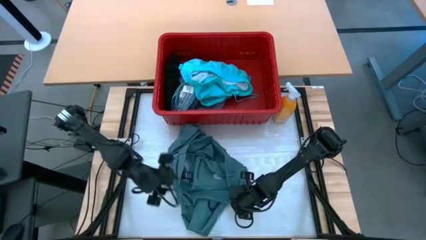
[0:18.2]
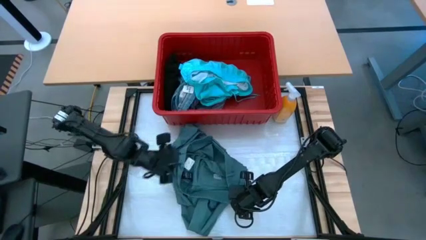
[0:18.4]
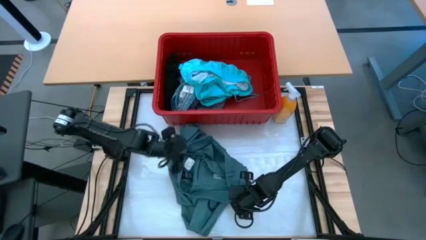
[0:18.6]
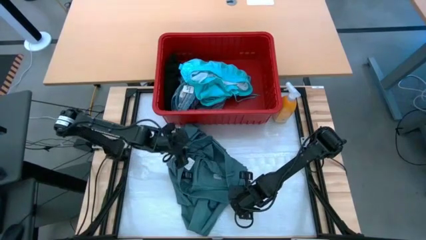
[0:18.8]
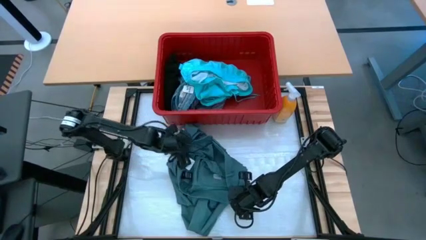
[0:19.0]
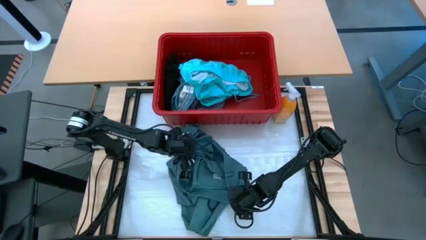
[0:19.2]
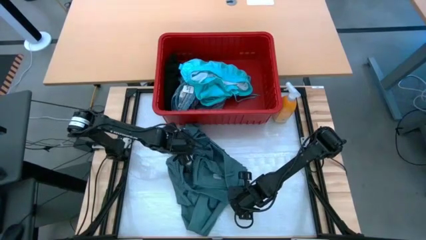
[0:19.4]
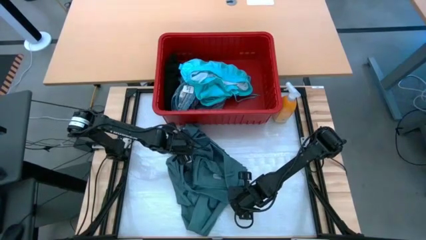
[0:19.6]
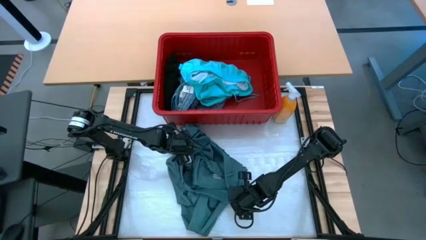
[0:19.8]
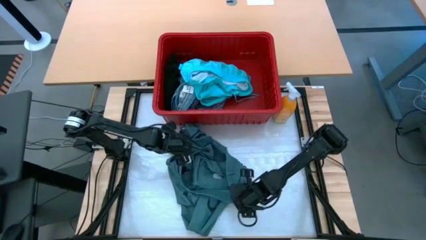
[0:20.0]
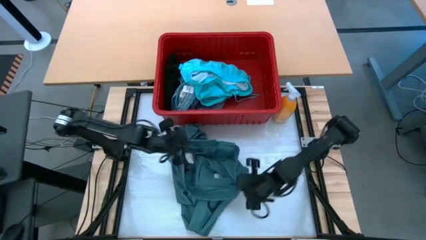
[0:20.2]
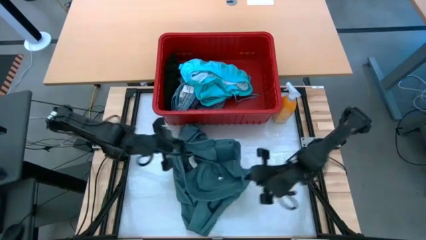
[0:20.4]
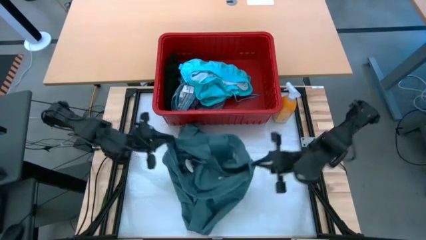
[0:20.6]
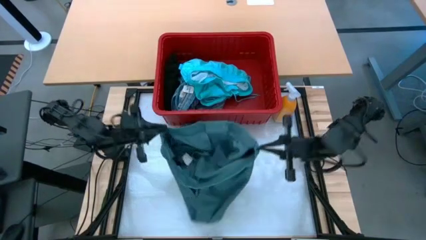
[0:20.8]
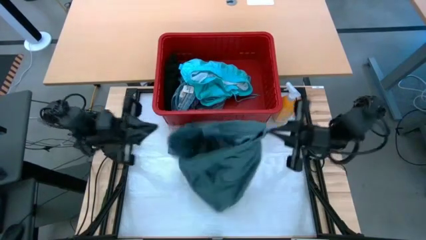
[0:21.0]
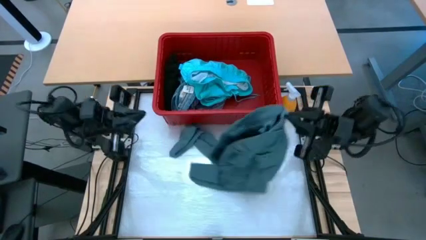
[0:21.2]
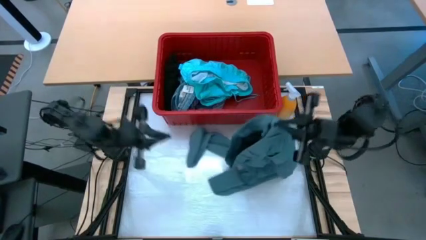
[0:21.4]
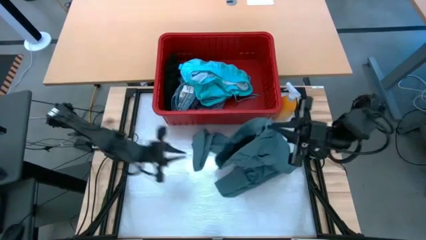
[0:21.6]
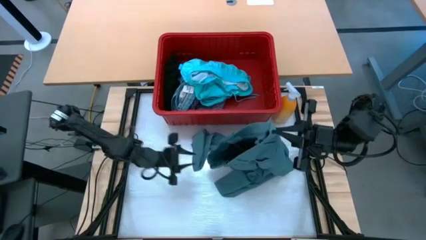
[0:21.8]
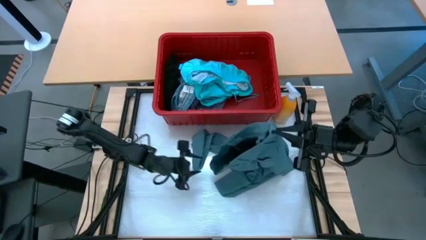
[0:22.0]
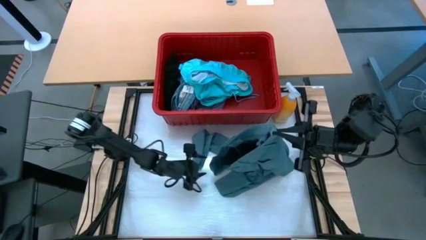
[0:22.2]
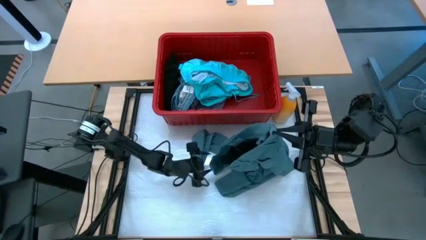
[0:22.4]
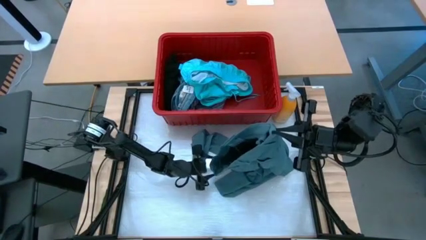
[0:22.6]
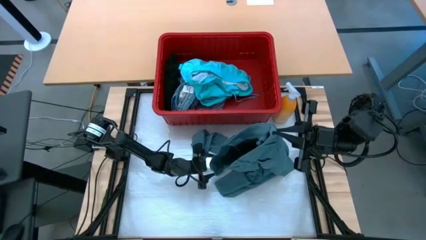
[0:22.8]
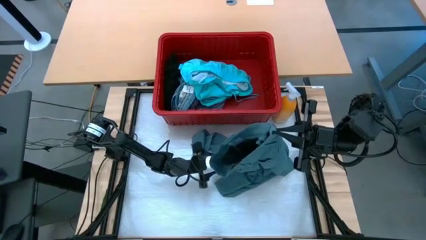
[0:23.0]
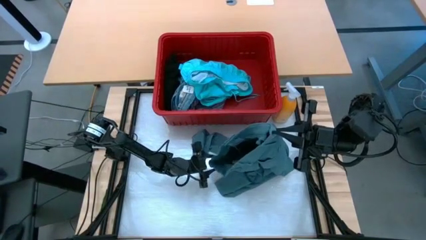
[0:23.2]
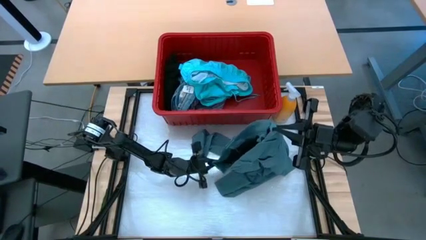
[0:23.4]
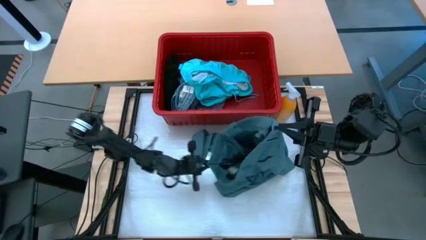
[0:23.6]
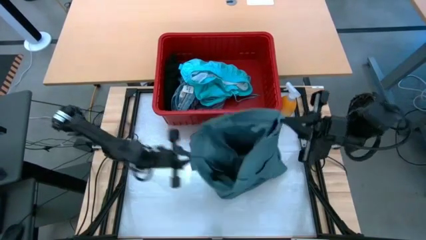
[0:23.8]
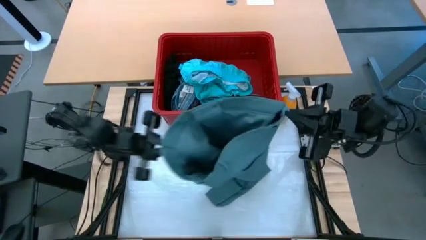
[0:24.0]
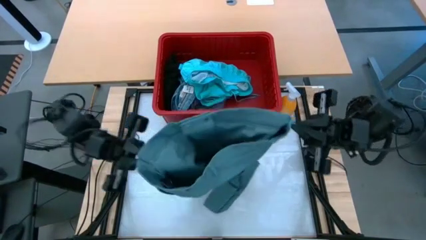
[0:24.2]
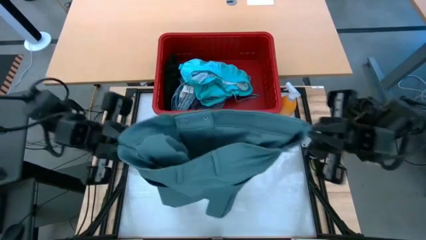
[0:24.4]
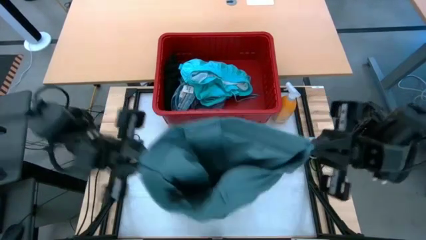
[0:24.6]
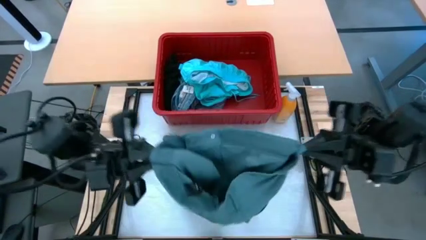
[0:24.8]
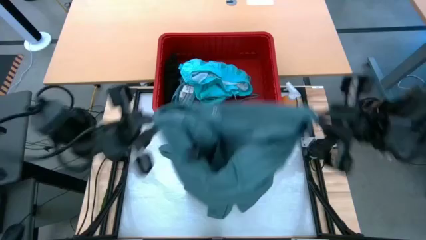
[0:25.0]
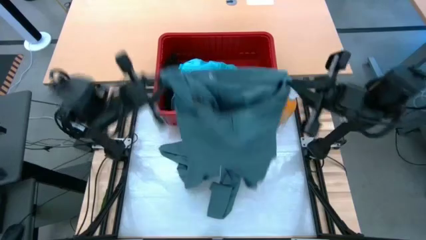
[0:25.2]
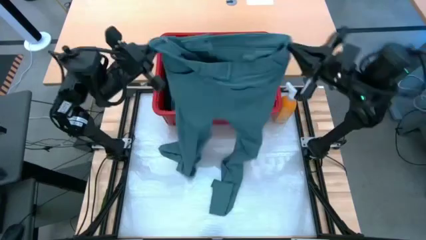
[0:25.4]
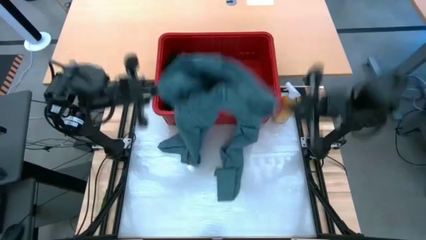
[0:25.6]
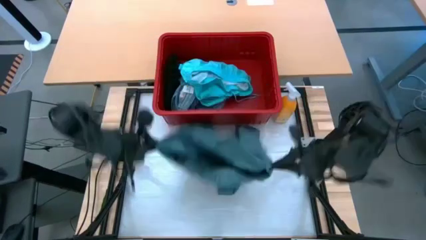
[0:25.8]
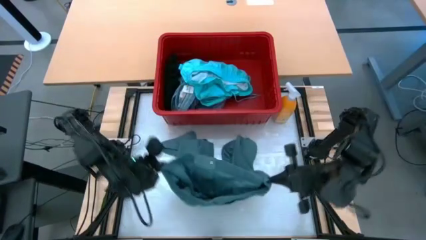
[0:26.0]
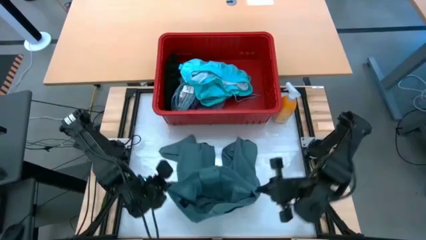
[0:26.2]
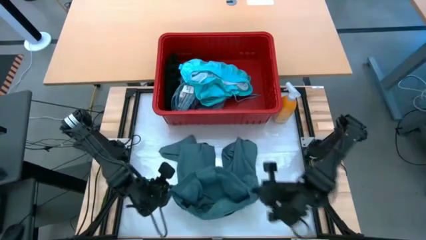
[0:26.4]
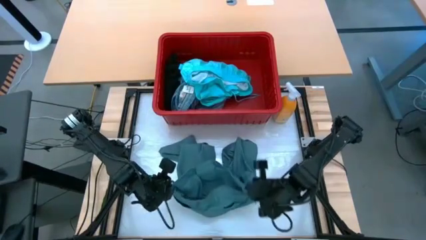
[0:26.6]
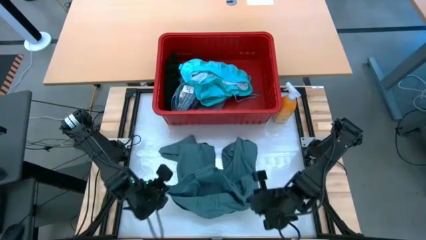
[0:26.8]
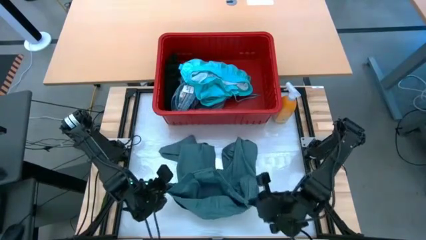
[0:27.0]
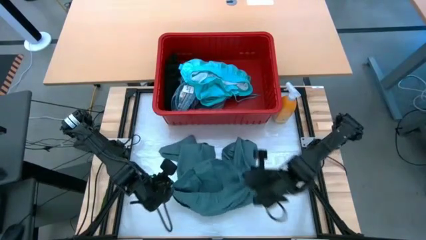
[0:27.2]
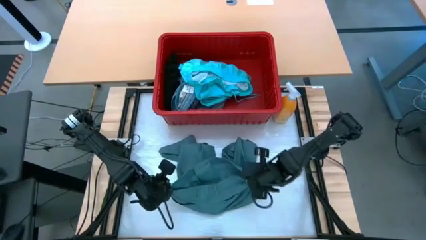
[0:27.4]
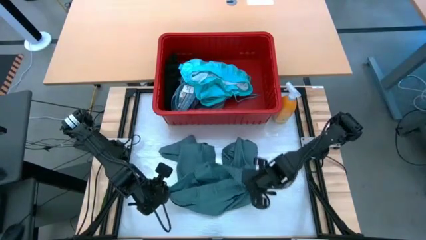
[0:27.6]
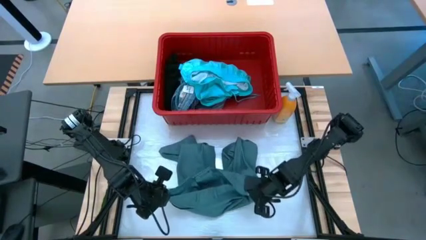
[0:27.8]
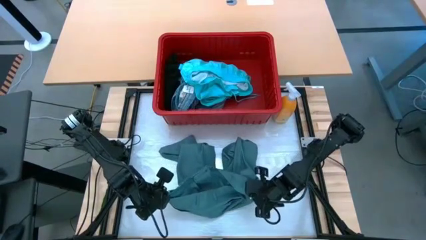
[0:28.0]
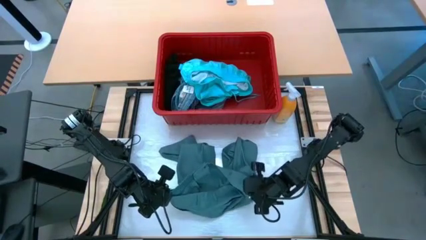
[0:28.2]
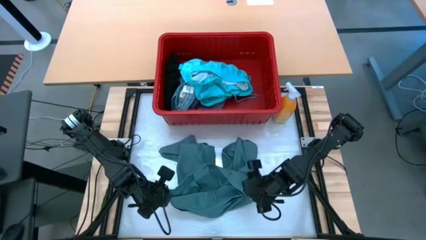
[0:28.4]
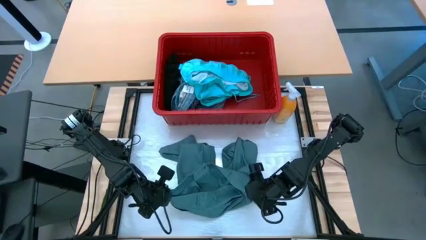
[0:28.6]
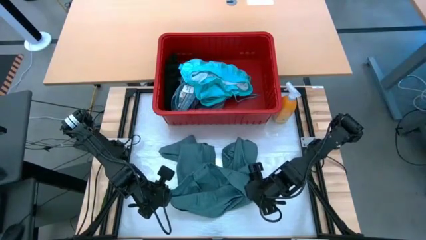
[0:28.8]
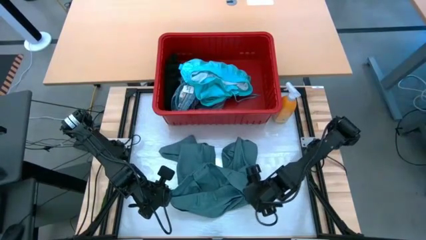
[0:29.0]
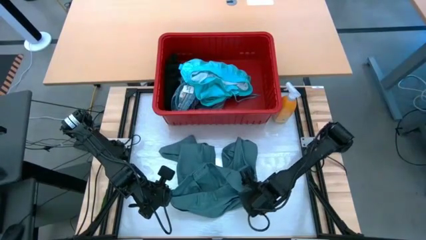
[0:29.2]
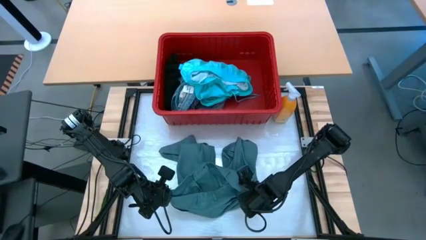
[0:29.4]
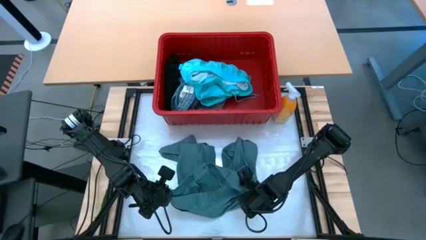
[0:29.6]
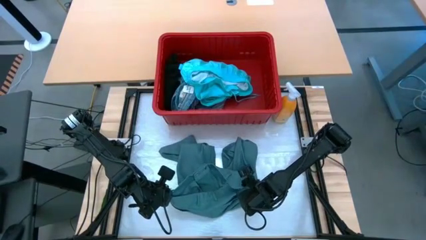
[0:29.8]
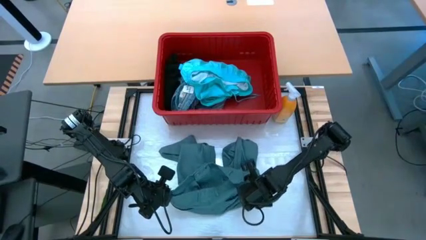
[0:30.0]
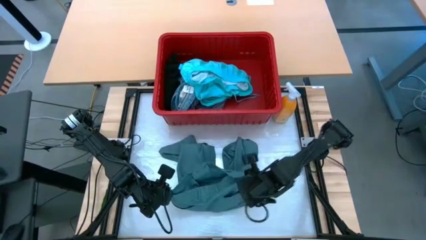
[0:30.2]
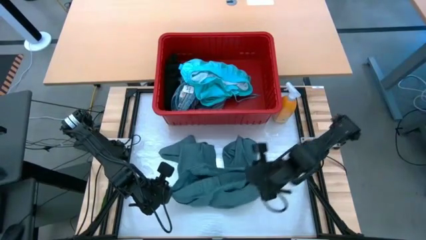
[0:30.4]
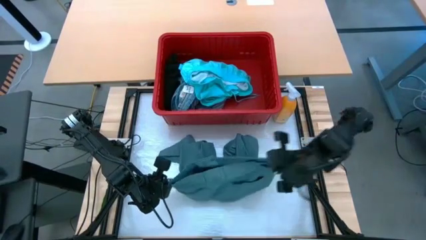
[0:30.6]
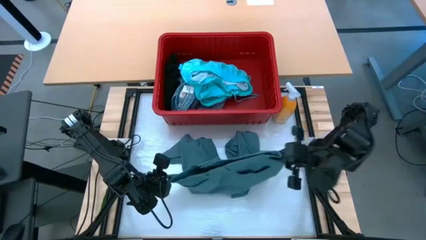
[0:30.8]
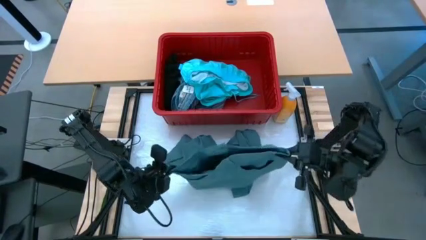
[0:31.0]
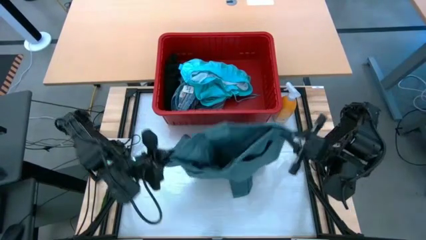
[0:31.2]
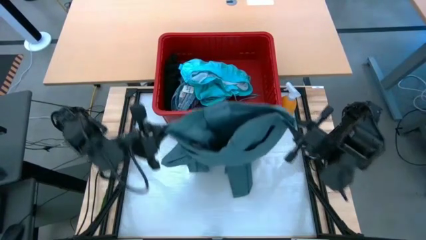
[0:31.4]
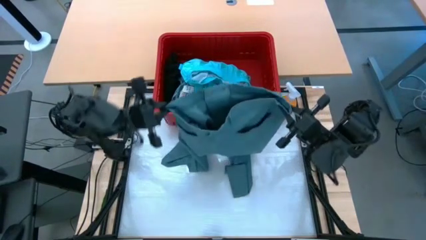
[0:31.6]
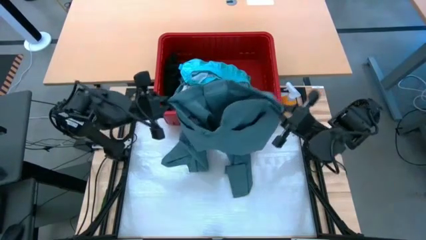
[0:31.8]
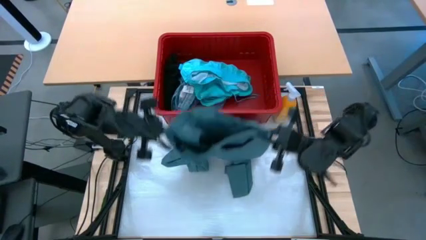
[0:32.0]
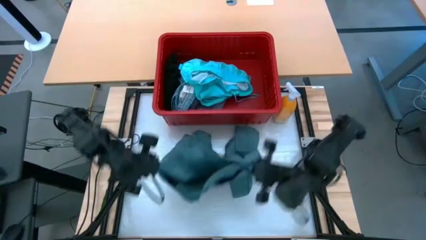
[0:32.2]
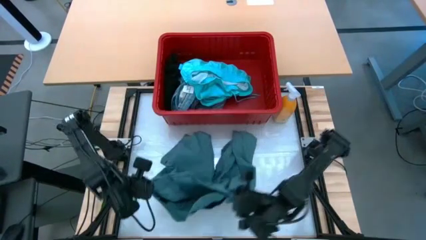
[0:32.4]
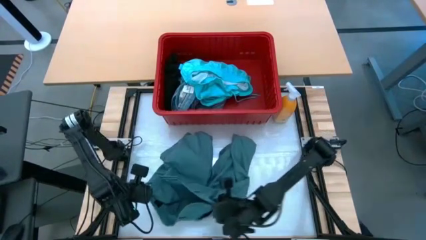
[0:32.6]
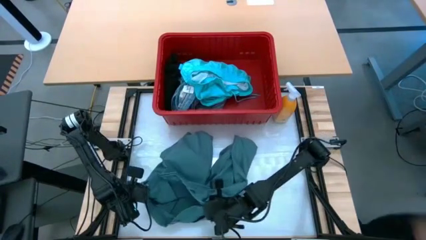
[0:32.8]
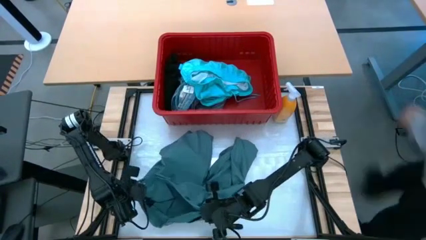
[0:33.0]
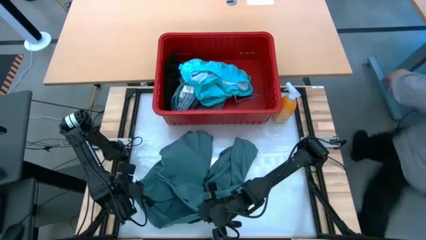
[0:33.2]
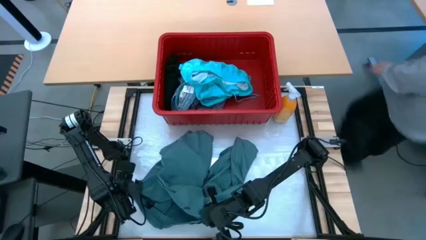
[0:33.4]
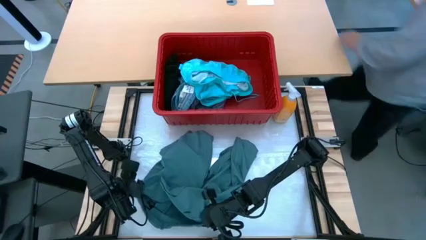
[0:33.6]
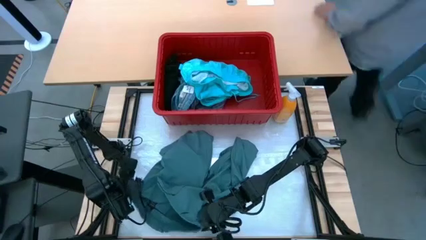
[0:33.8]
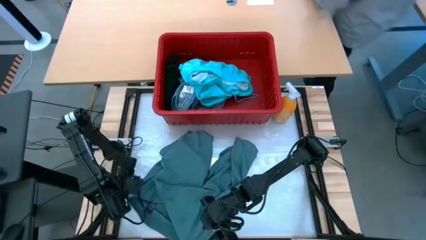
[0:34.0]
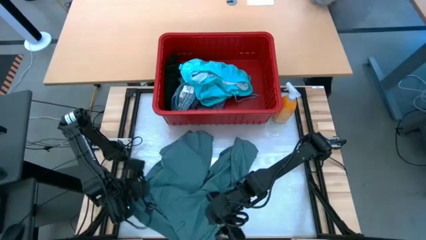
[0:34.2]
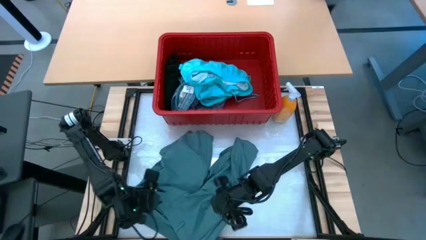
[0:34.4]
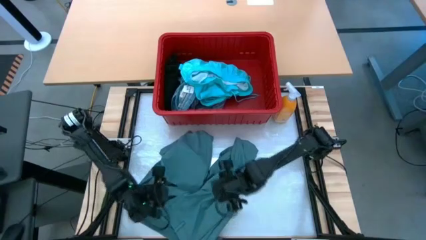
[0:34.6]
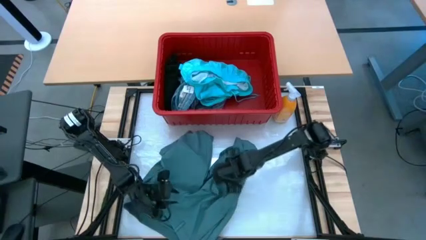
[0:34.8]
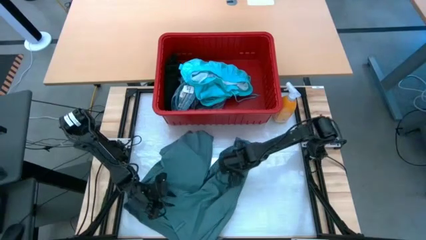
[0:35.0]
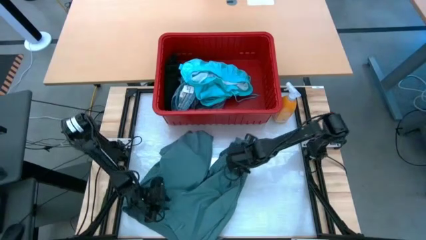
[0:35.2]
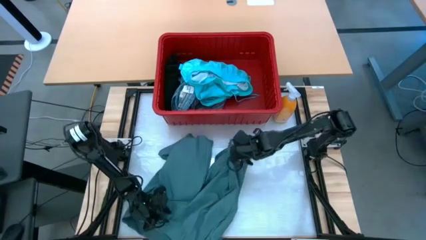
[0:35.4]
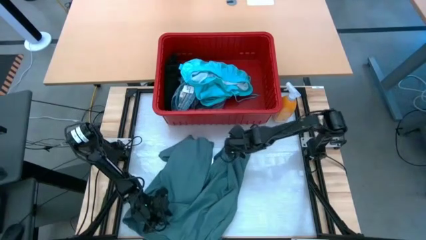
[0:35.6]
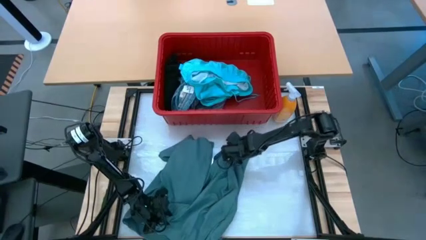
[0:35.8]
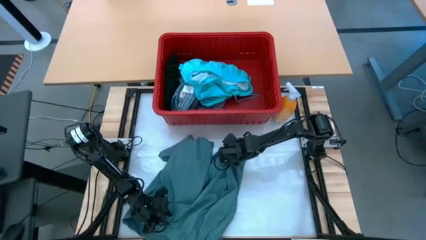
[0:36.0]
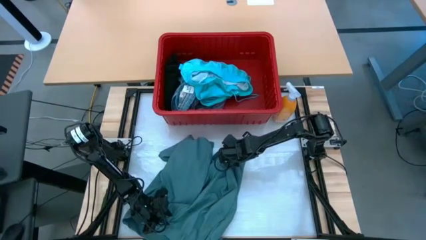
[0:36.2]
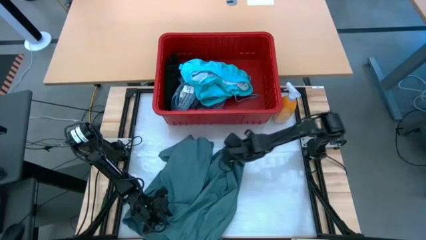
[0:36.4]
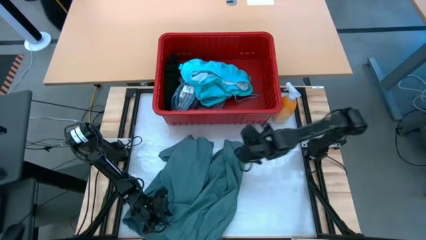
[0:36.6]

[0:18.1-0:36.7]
Task: Fold Laundry from Bin
Fold the light blue pants
